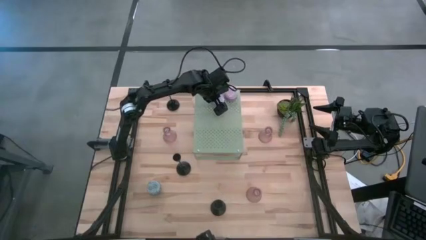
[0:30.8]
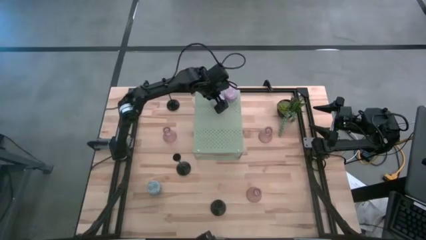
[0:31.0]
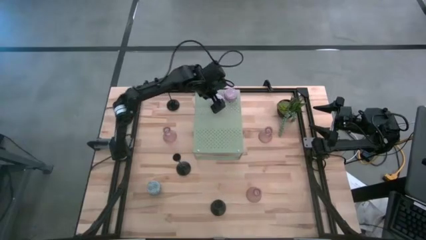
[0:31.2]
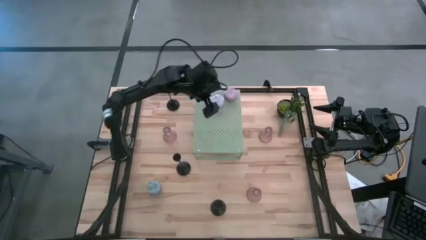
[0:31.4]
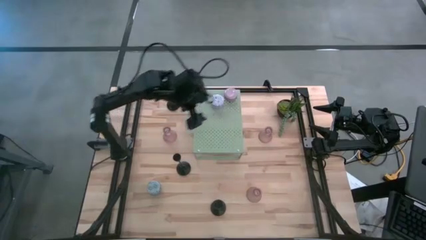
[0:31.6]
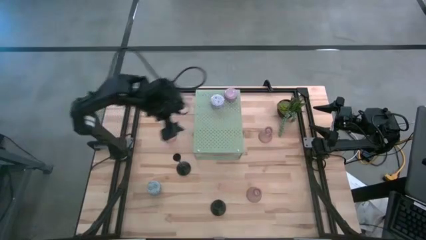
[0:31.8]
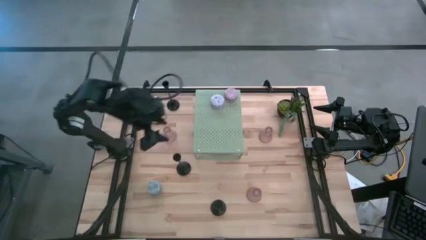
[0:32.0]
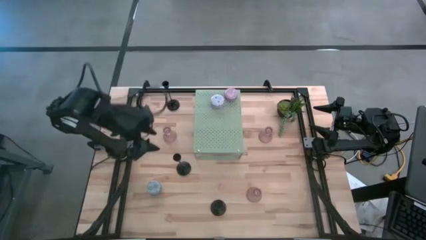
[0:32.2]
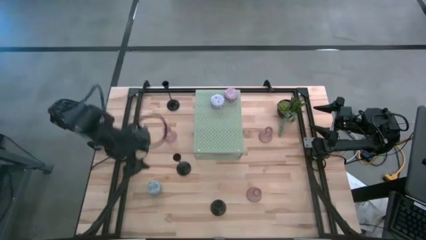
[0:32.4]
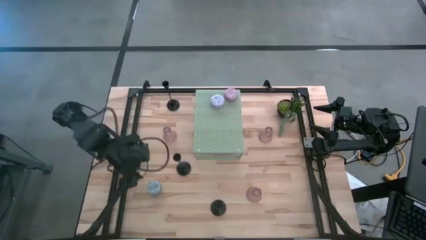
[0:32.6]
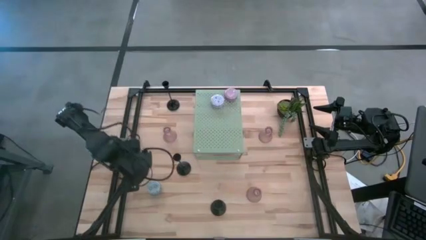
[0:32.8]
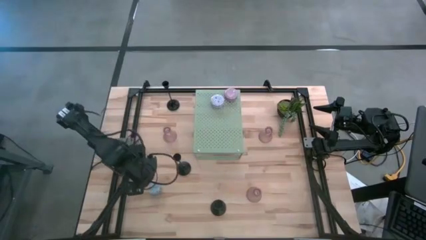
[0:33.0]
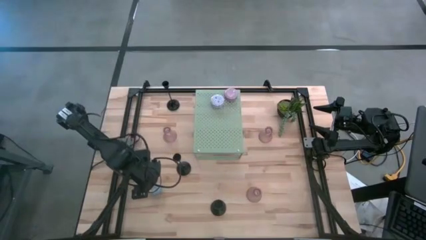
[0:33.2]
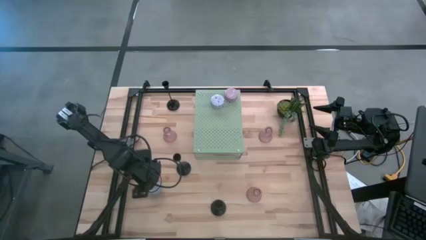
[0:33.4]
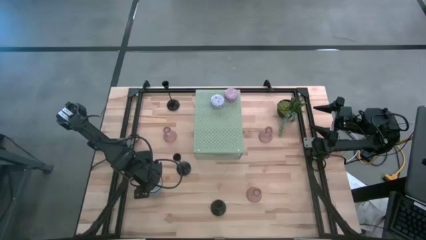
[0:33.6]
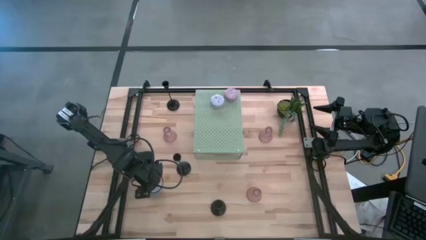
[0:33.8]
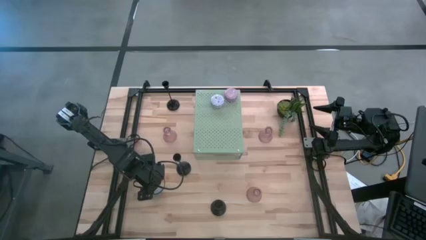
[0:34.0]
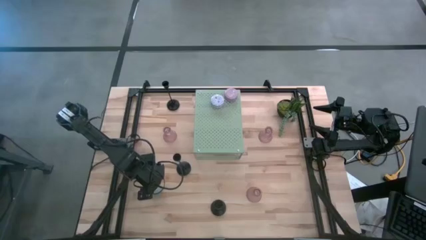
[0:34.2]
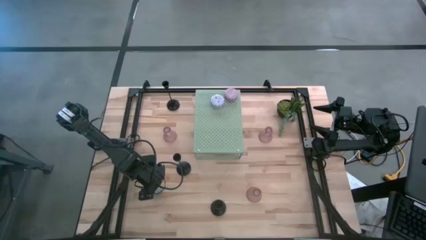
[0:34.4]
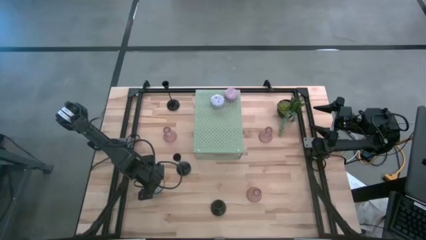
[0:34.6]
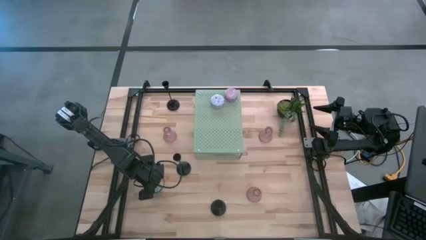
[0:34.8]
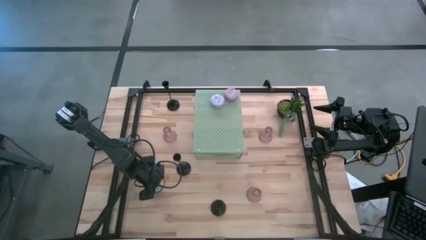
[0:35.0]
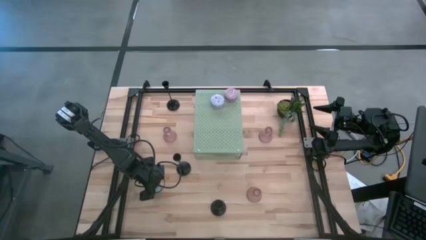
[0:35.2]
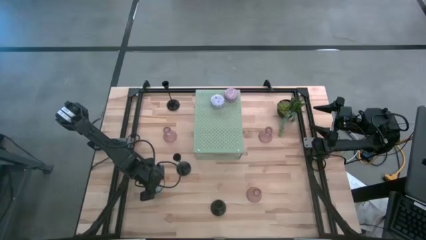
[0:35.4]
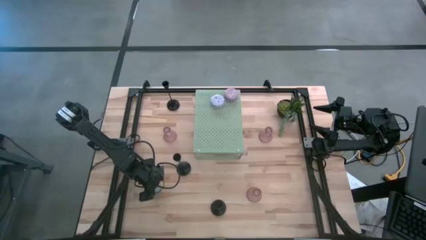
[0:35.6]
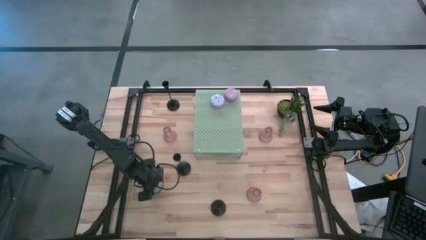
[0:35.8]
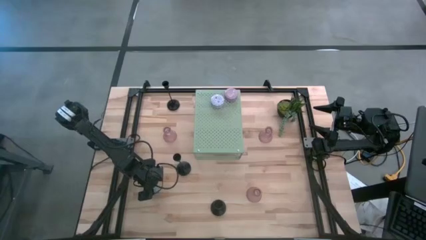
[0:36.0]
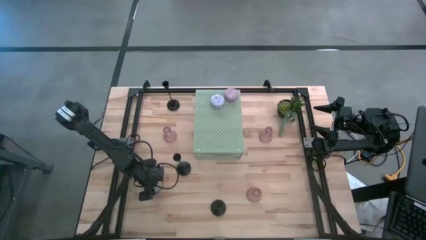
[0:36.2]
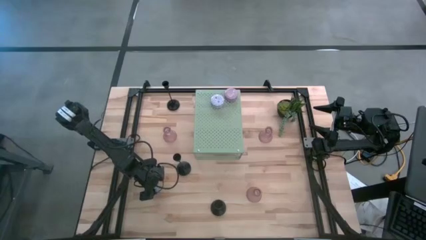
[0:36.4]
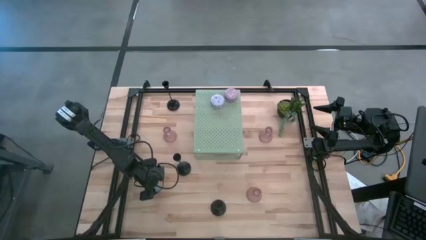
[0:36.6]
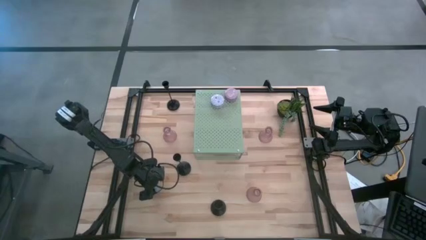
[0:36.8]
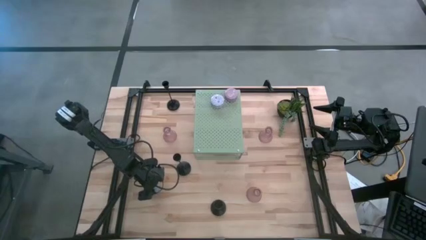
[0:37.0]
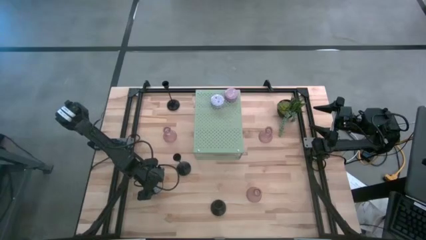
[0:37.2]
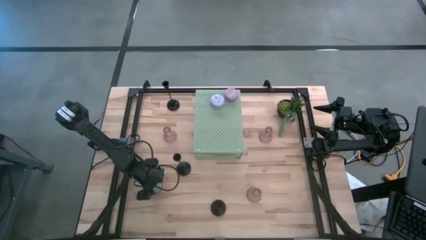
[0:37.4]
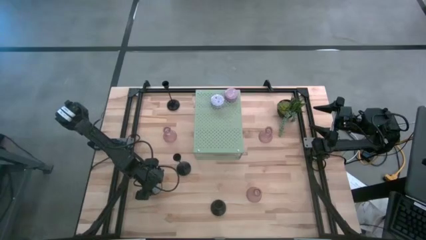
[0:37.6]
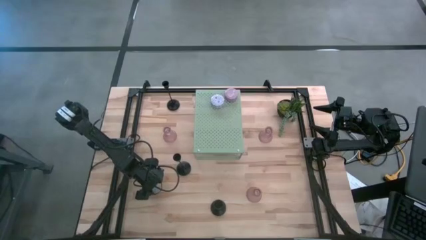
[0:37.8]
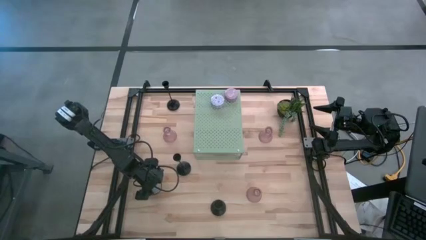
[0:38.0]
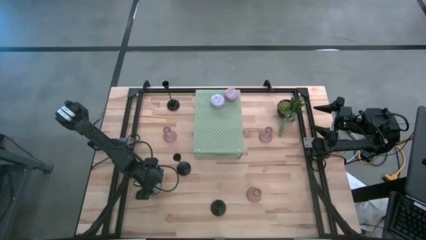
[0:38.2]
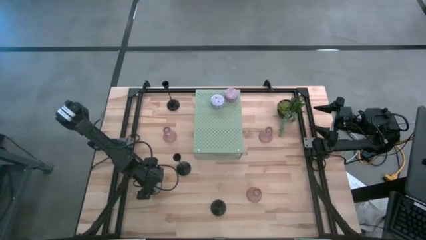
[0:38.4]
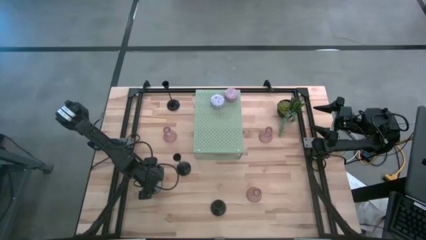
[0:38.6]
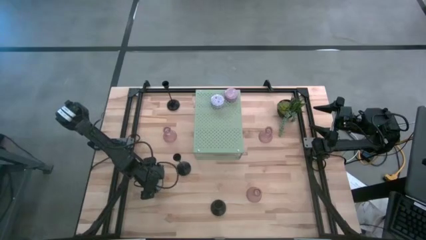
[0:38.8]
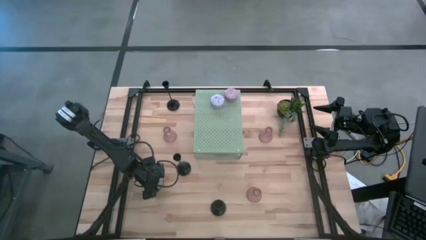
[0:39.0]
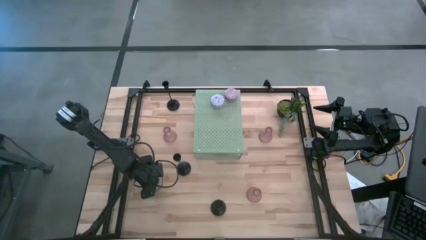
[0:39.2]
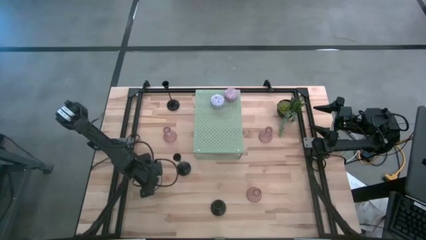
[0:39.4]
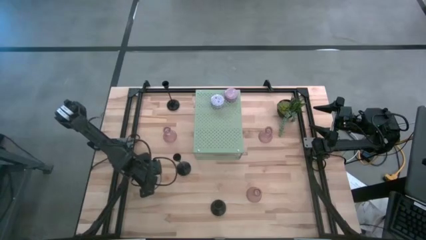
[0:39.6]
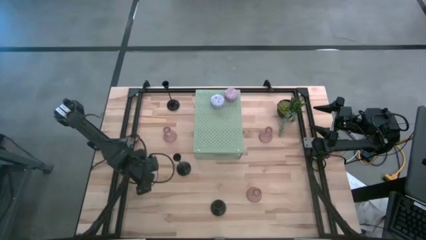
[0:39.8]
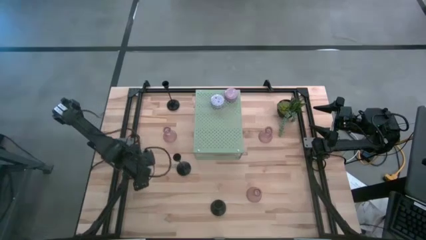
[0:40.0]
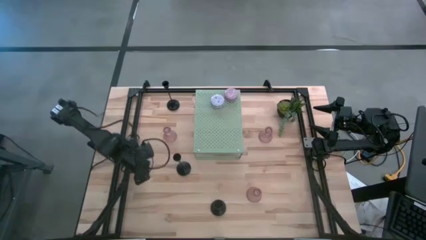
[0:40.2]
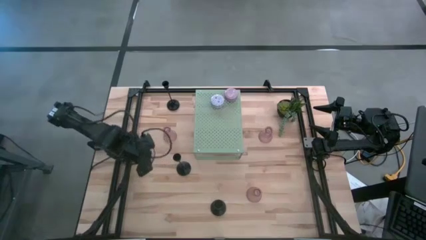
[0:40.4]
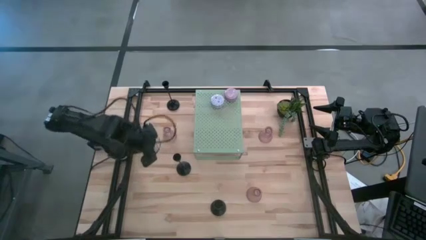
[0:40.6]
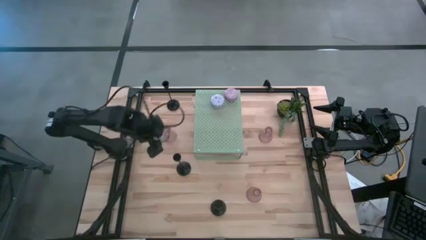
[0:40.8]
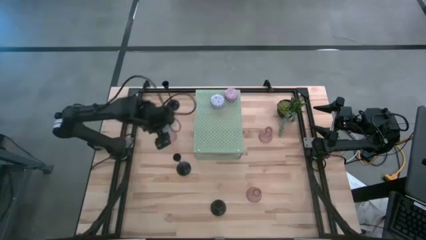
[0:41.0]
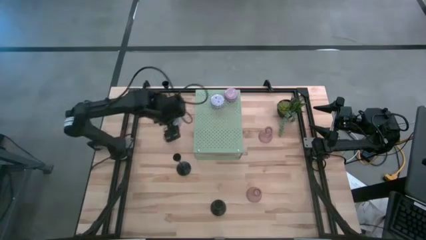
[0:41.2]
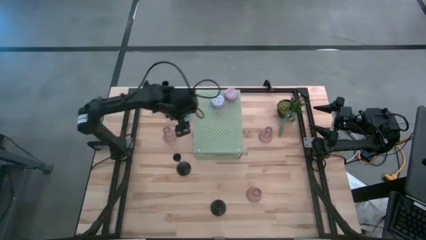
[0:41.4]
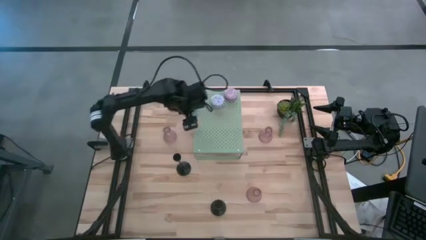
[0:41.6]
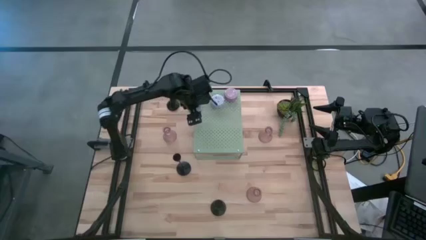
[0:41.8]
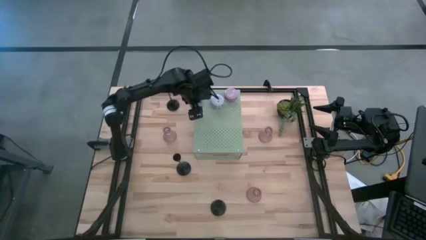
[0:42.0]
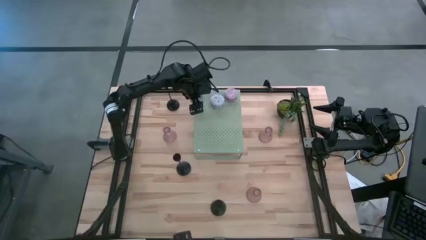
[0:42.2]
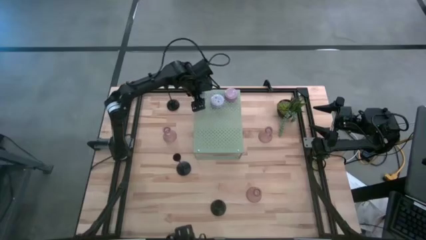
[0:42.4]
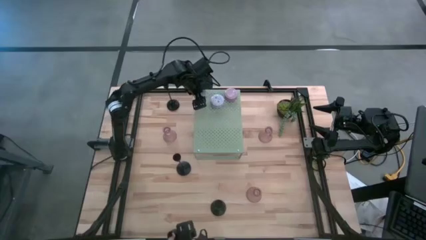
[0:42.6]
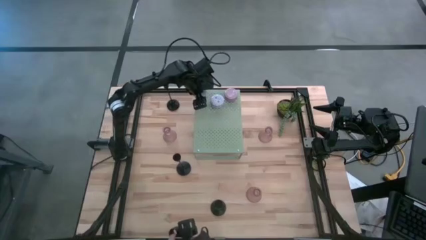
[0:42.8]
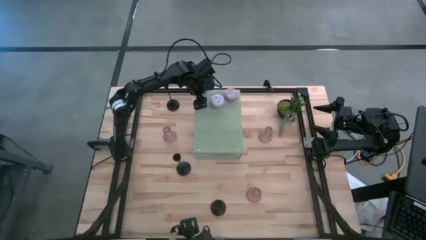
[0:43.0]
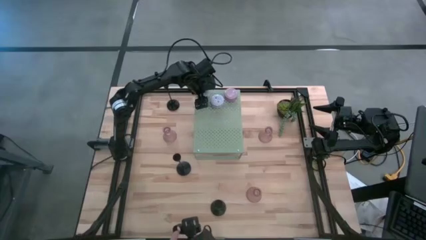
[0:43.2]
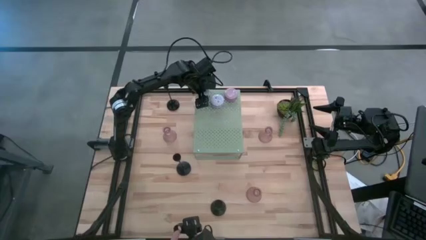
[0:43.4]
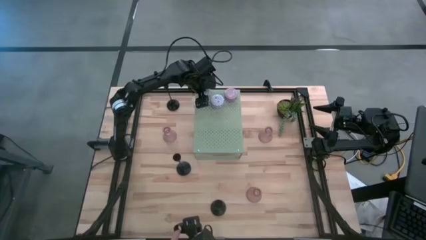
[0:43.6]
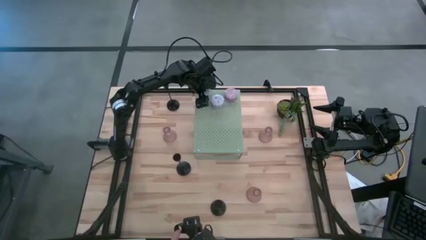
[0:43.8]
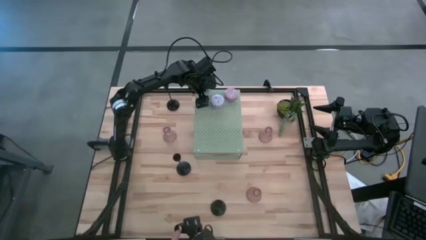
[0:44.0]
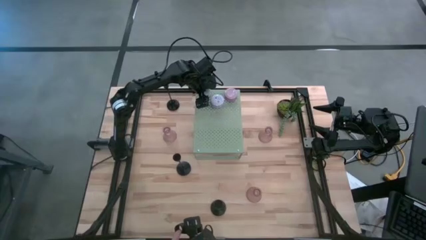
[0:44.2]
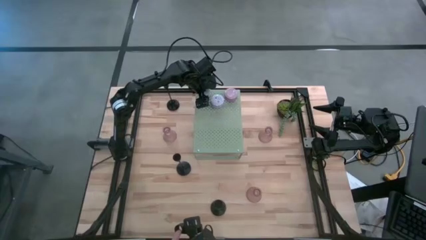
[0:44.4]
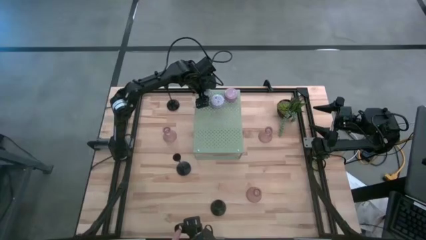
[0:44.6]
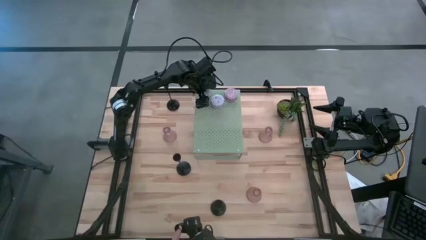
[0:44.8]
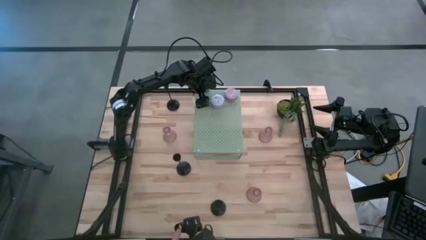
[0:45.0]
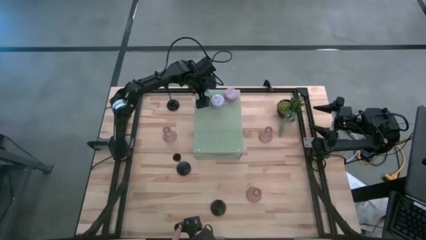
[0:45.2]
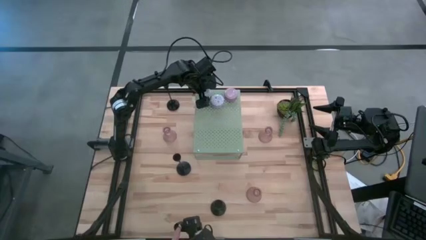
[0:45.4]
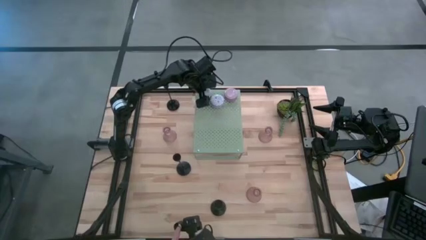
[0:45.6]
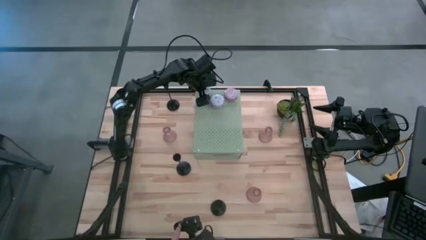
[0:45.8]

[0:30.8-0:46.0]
Task: Pick & Place candle stick holders
Put the candle on the shelf
